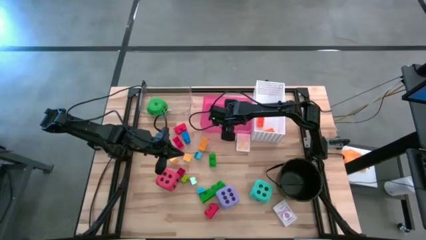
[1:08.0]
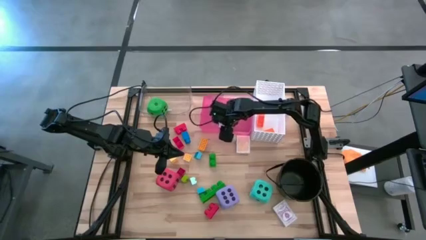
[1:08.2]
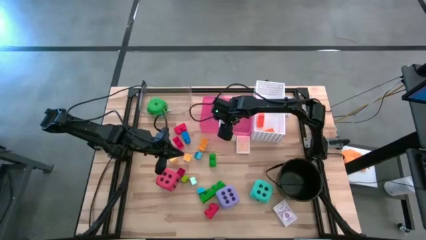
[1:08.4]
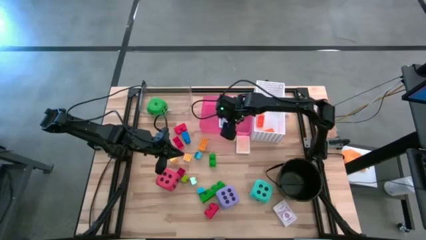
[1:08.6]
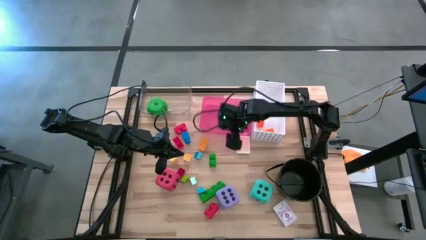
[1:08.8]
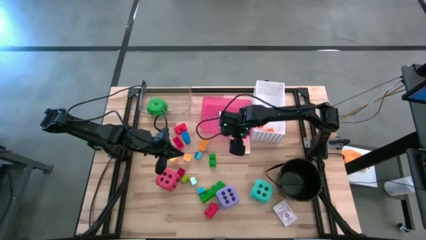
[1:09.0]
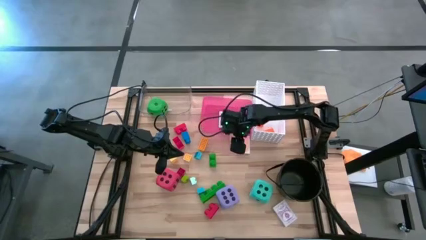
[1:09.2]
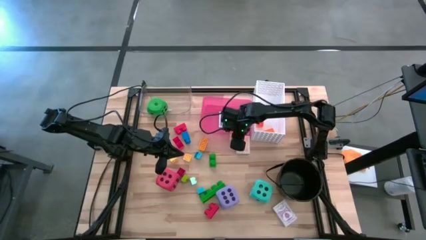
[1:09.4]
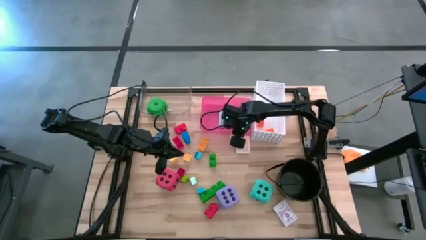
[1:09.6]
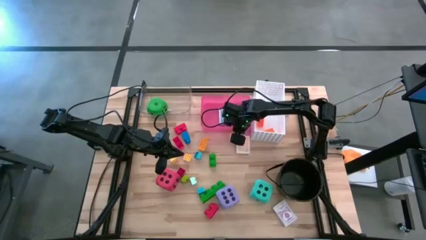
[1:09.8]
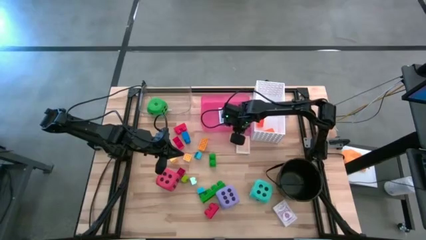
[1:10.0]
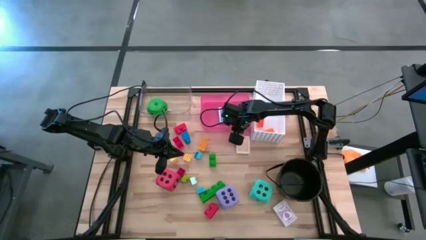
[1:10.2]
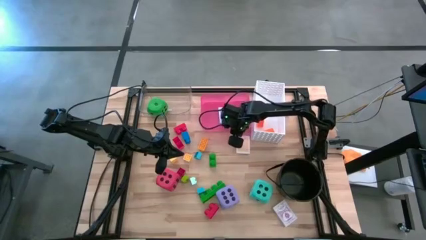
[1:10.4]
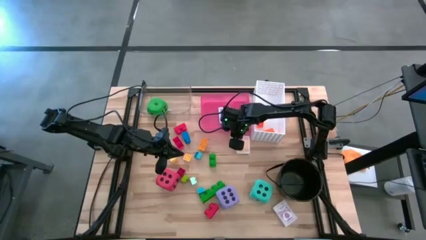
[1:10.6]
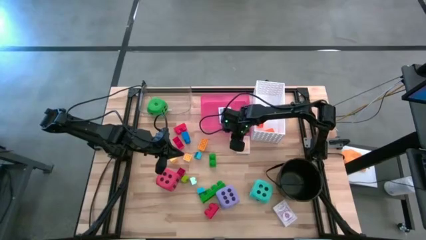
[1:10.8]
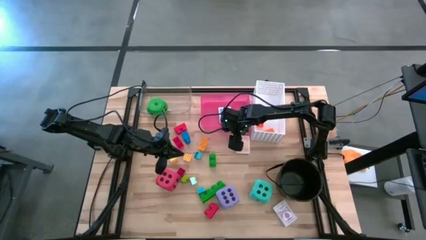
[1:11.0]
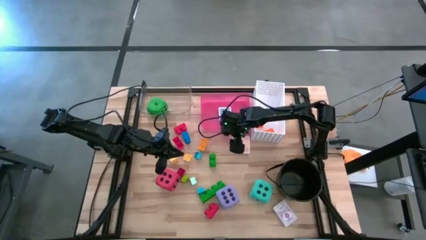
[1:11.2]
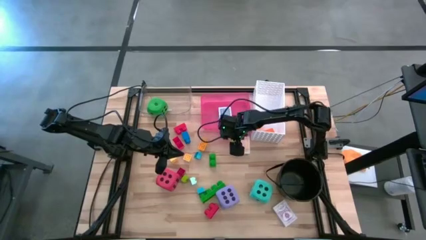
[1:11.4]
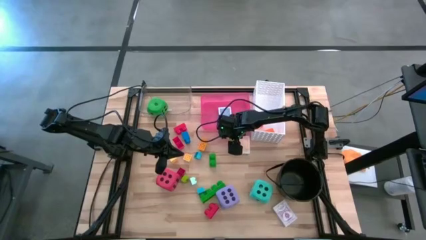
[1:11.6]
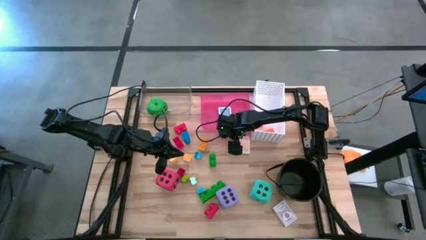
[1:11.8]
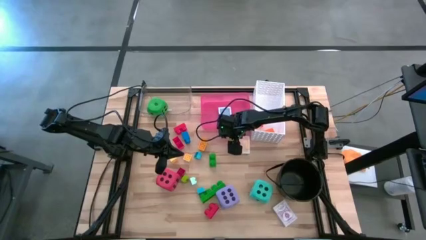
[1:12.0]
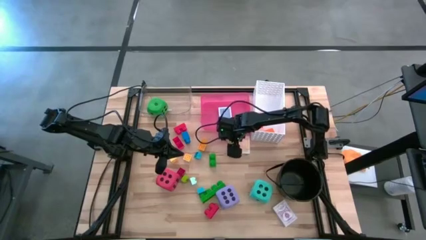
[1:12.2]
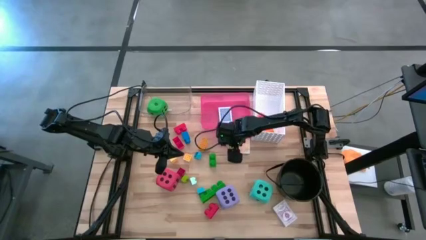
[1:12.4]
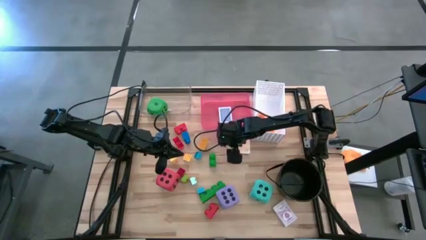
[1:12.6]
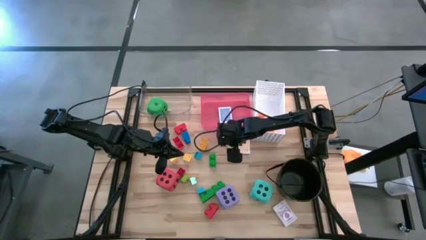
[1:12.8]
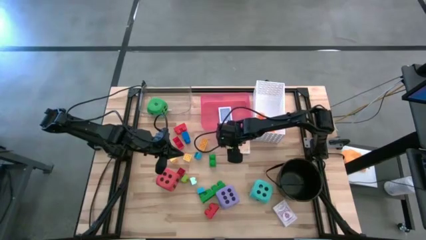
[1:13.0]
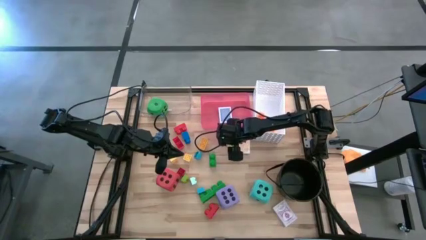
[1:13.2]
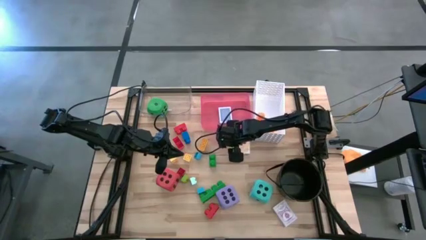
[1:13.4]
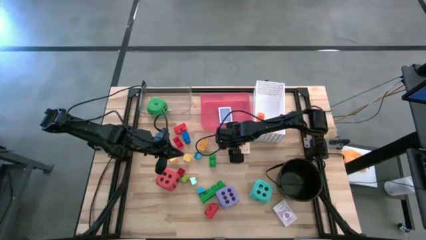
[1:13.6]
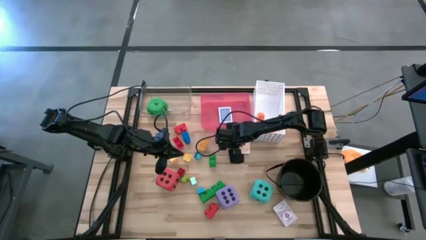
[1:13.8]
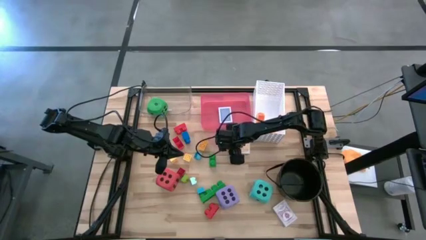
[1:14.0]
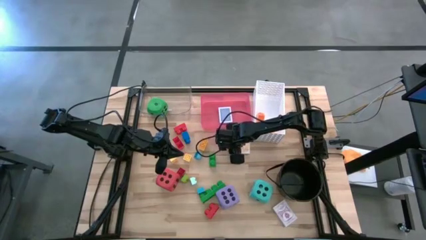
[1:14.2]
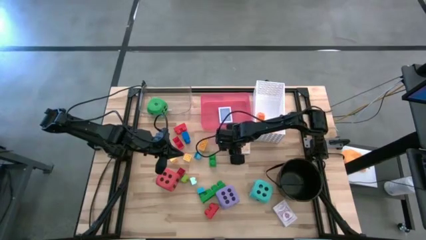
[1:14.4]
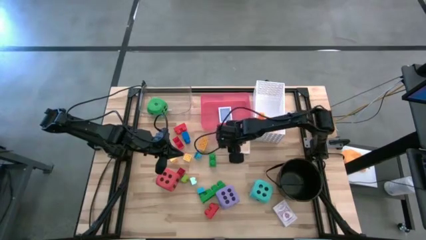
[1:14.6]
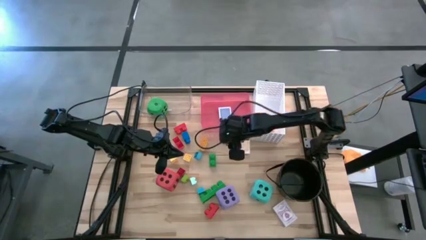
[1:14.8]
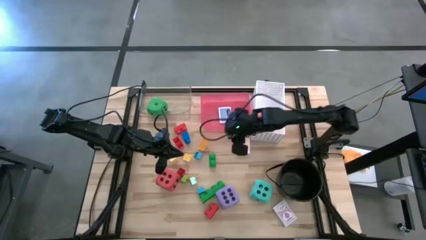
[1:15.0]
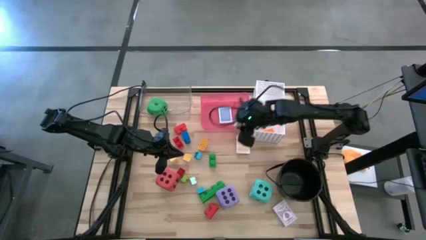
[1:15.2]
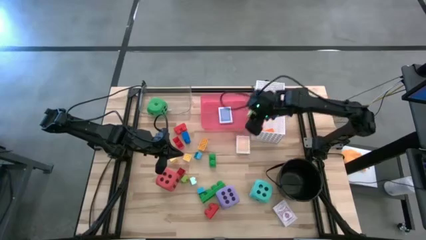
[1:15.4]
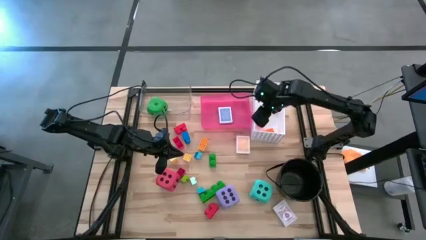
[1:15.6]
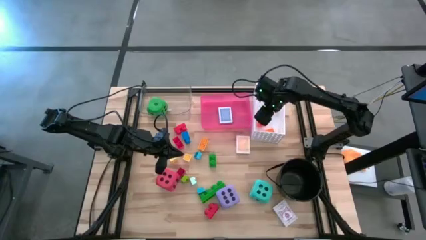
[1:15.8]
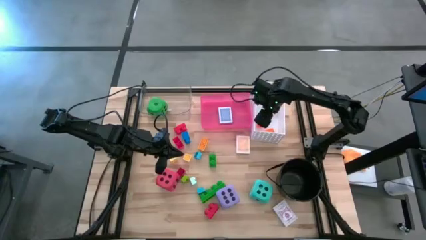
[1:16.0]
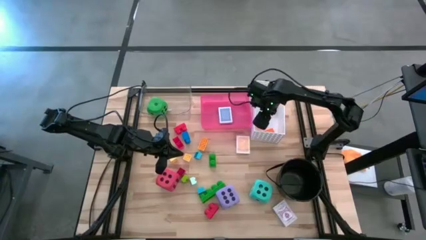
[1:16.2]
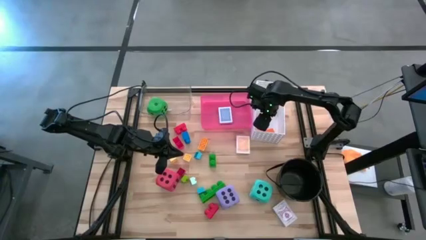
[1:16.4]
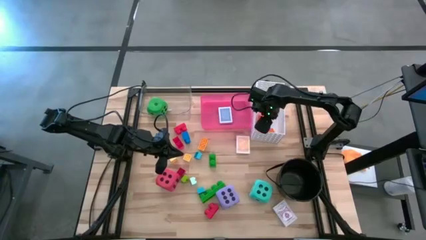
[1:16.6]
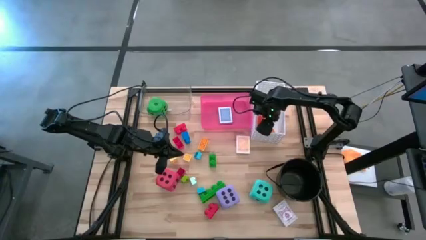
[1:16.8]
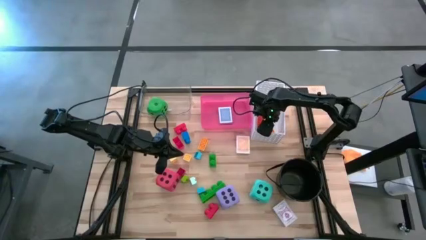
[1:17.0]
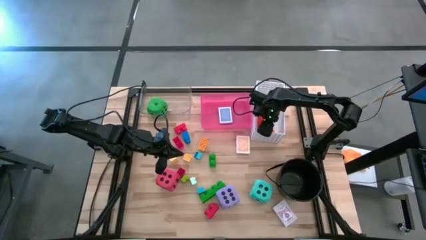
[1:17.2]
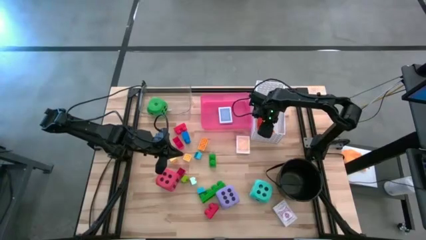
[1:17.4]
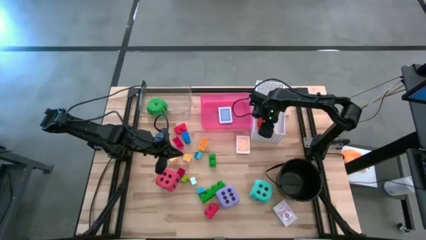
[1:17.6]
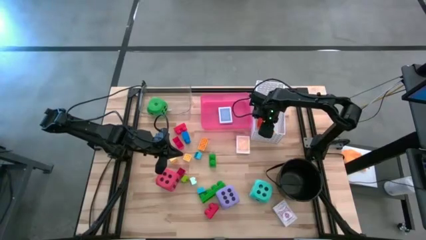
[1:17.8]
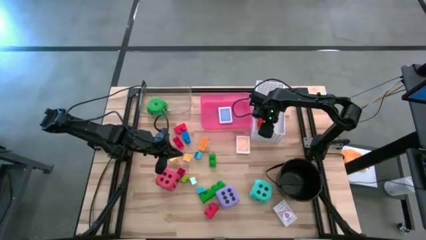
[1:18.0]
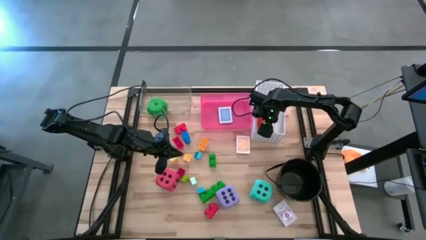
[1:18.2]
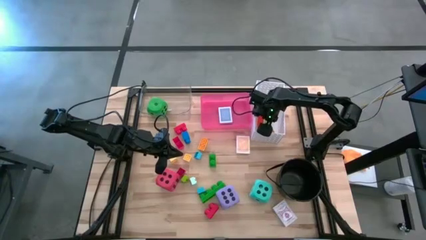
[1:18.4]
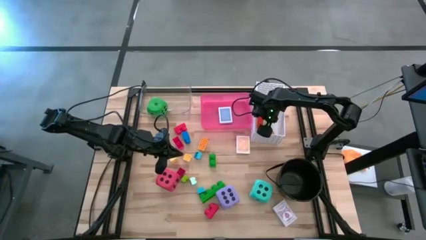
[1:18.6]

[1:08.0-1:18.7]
Task: Pick & Place Toys
Put the small light green game piece into the white bin

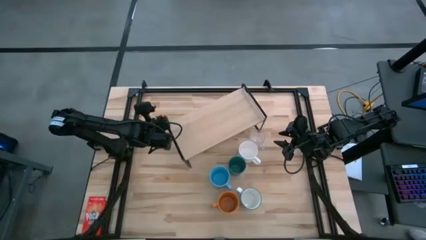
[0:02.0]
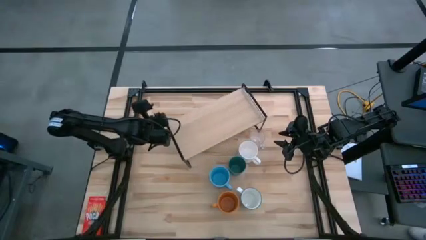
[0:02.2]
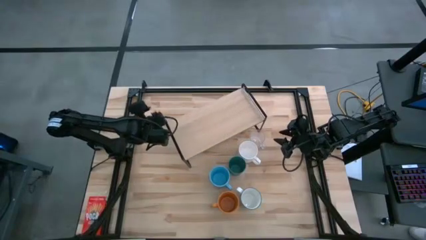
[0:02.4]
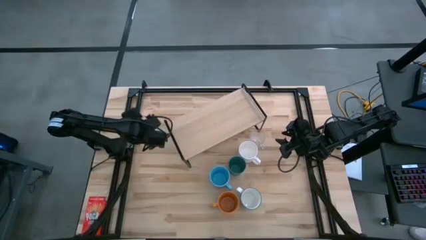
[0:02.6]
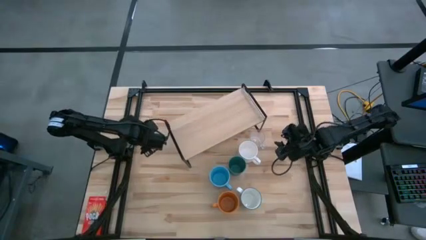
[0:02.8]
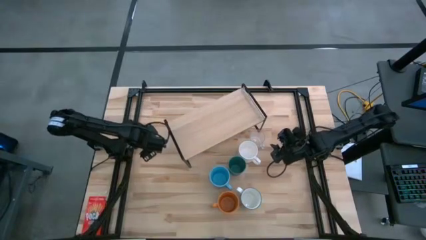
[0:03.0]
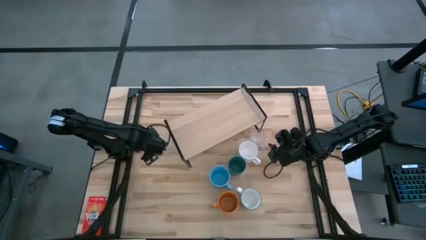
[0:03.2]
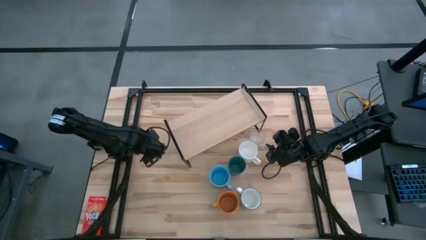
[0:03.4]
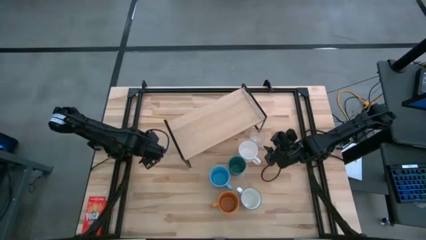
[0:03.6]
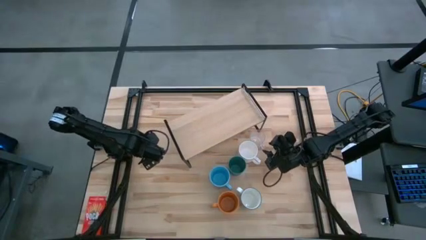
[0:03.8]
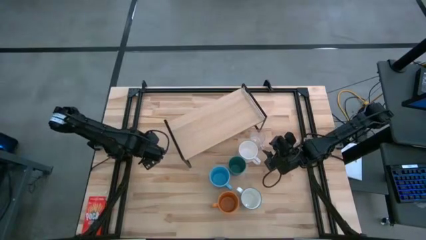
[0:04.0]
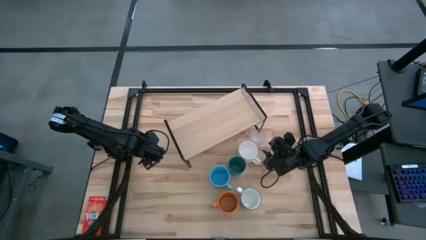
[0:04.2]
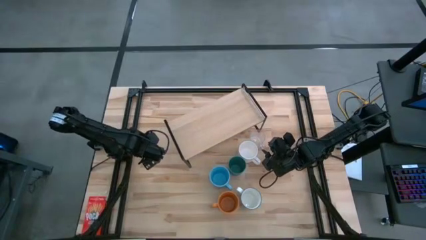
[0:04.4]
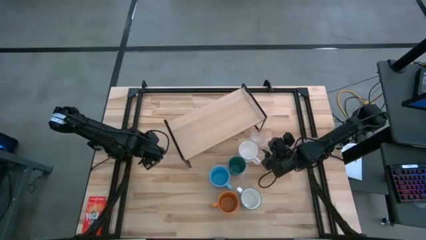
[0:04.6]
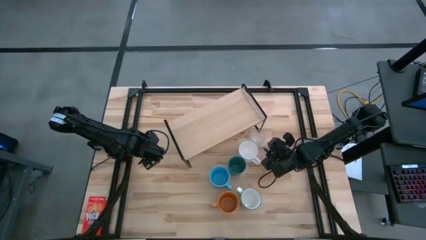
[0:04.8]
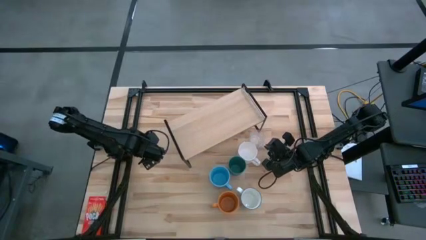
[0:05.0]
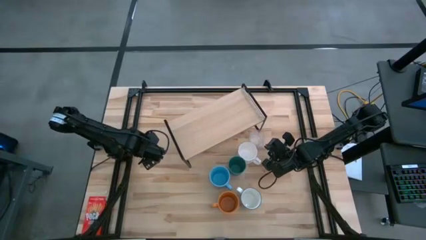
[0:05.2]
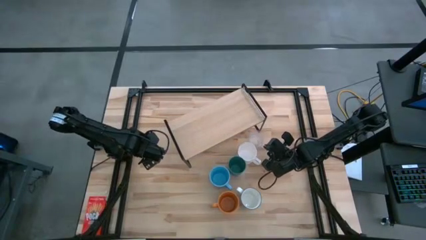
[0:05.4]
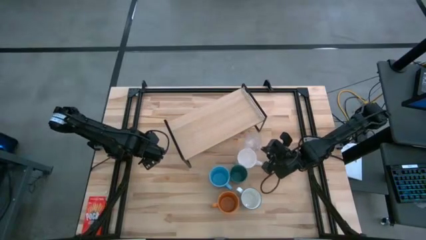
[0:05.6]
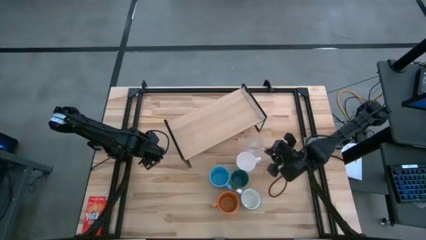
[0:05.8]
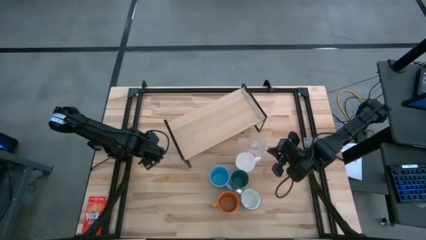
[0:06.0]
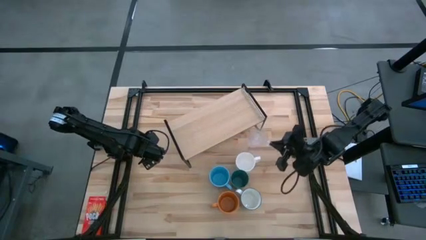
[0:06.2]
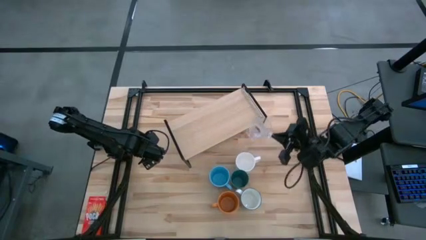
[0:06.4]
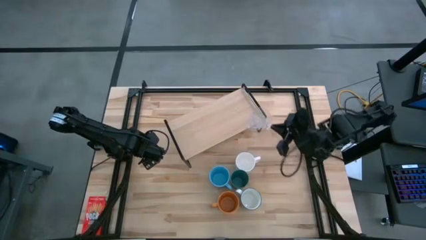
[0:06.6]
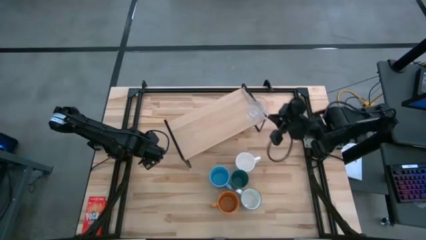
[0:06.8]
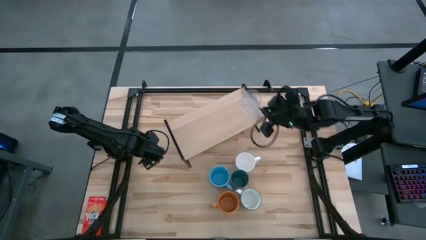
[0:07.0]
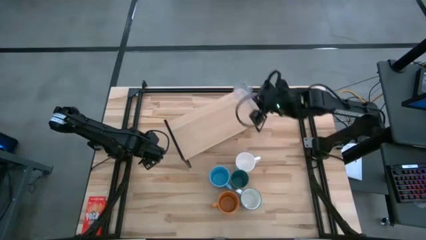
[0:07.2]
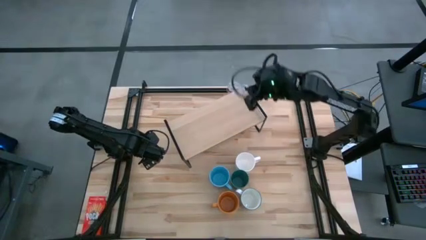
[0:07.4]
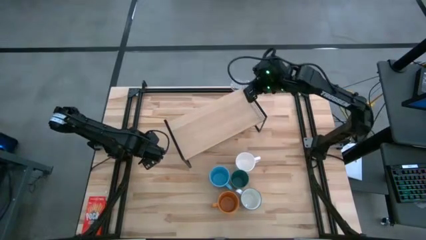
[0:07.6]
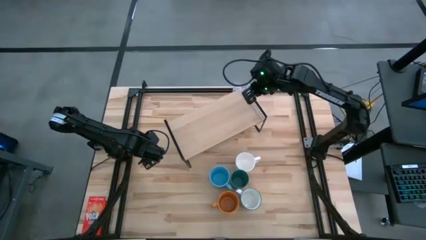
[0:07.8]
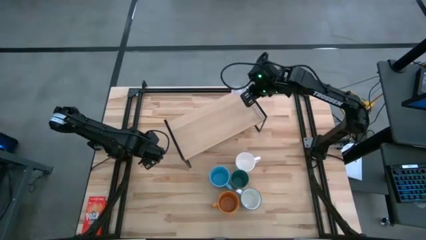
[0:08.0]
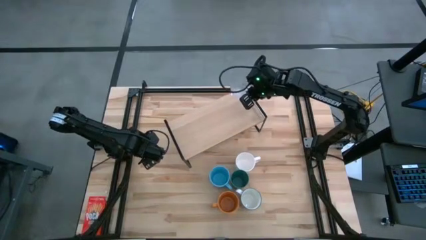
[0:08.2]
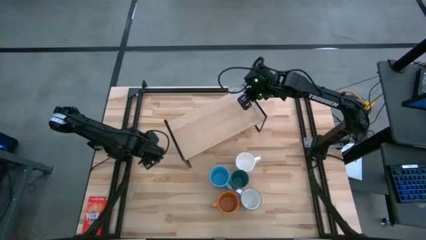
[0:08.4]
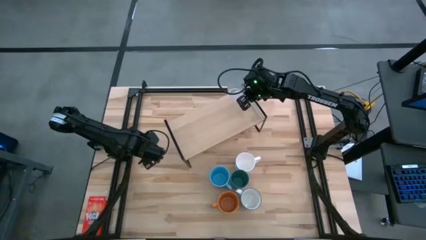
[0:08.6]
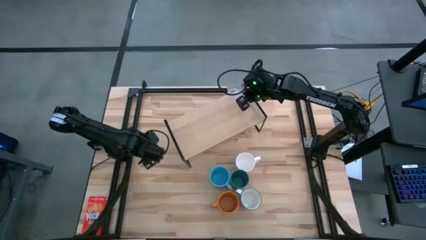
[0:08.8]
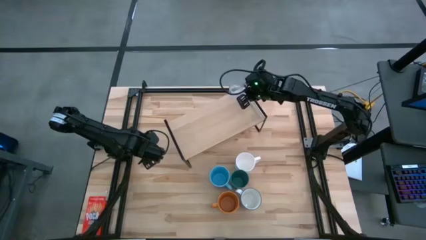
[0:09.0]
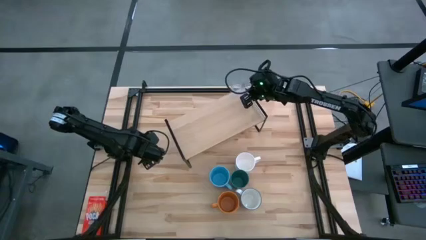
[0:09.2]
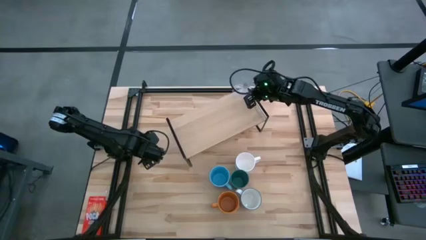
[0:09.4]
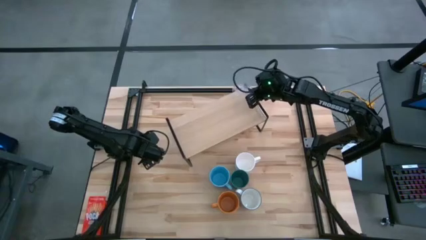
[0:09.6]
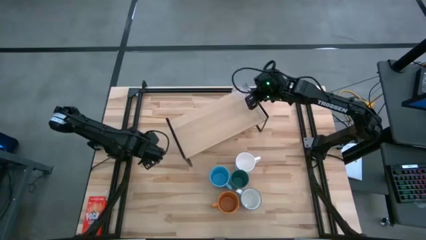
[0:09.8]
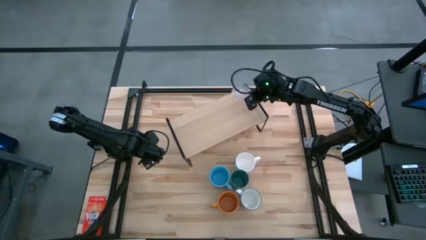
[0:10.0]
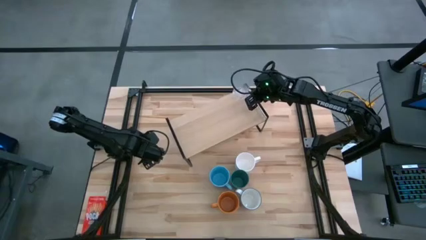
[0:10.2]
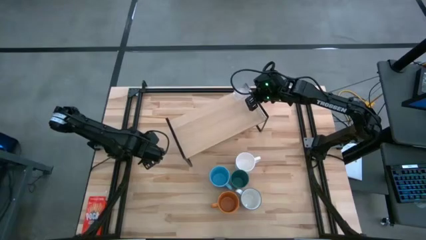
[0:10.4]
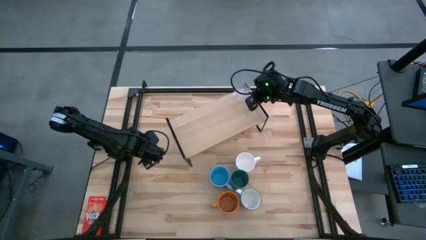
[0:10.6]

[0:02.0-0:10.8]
Task: Stack small to large cups/mugs on shelf
Put the transparent mug on the shelf
